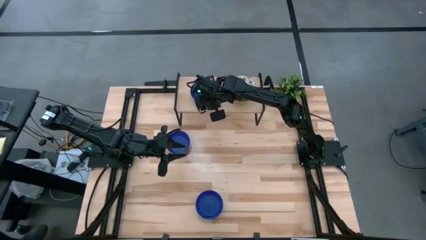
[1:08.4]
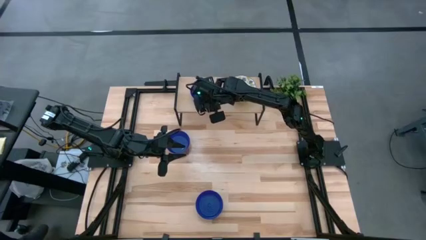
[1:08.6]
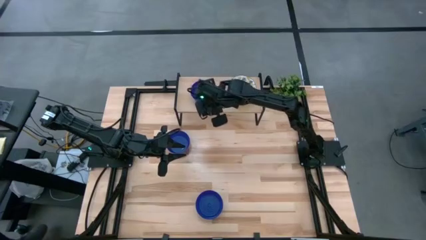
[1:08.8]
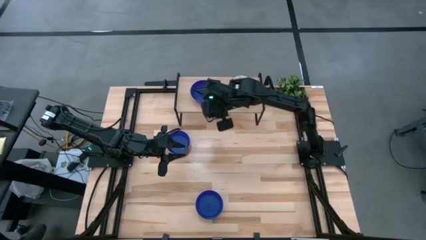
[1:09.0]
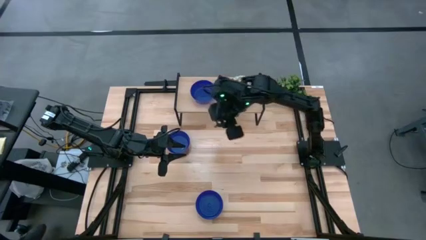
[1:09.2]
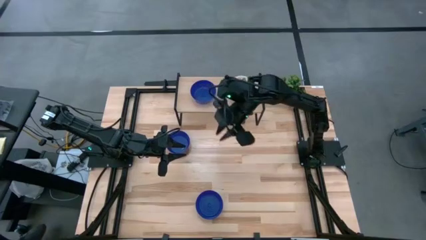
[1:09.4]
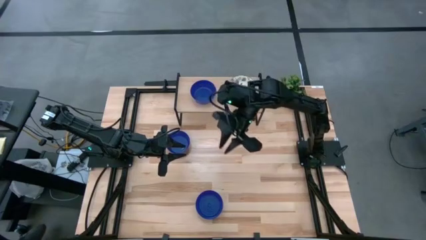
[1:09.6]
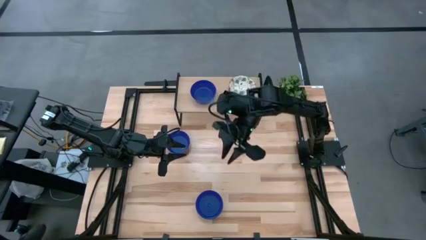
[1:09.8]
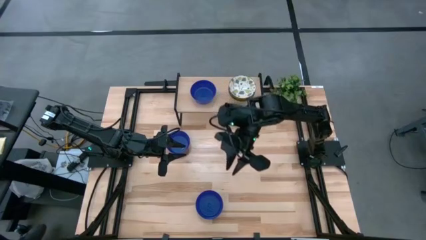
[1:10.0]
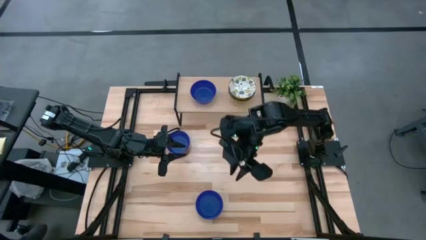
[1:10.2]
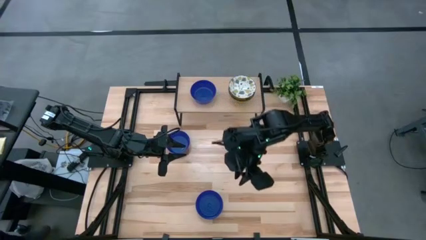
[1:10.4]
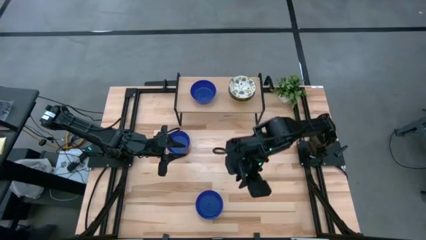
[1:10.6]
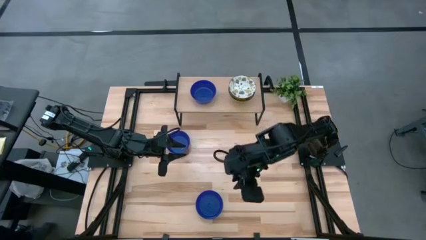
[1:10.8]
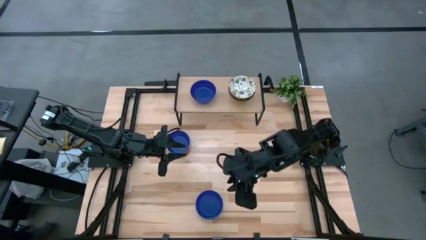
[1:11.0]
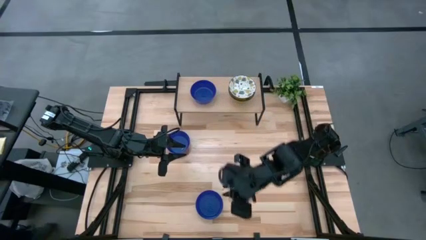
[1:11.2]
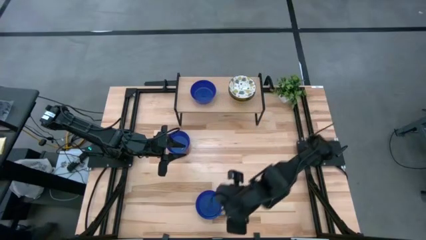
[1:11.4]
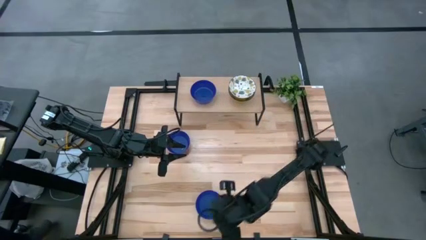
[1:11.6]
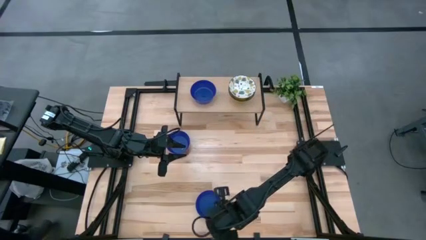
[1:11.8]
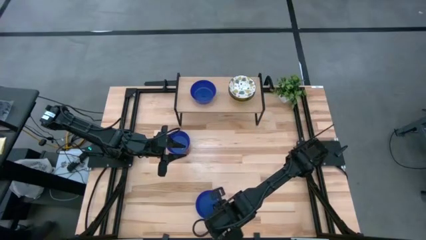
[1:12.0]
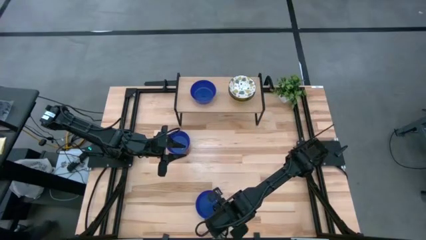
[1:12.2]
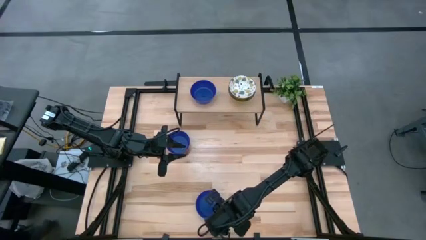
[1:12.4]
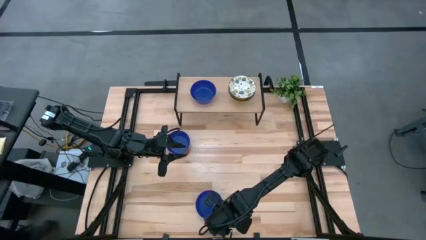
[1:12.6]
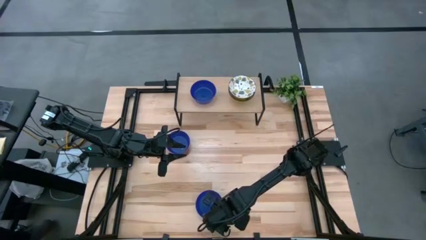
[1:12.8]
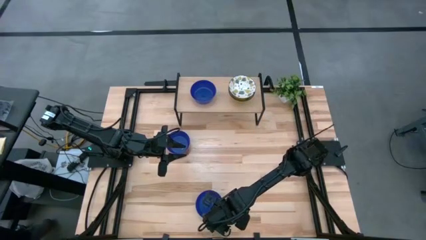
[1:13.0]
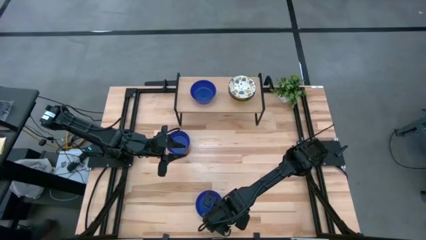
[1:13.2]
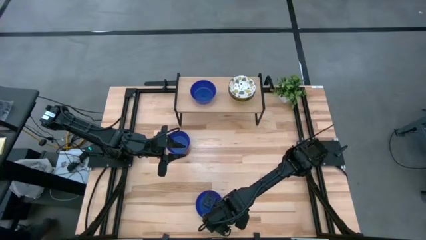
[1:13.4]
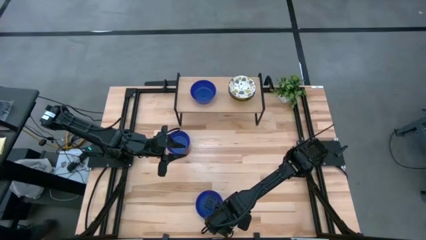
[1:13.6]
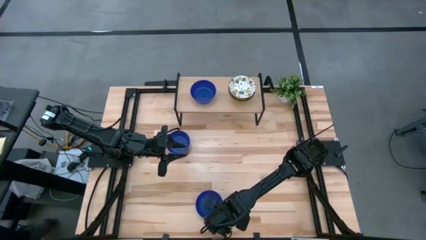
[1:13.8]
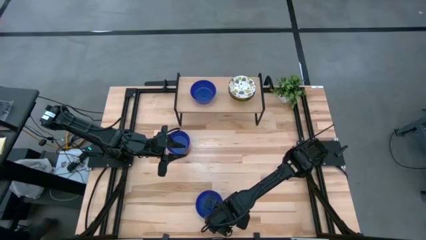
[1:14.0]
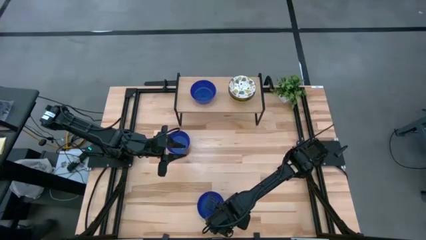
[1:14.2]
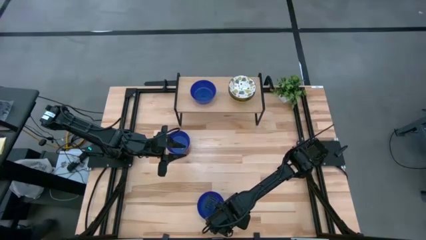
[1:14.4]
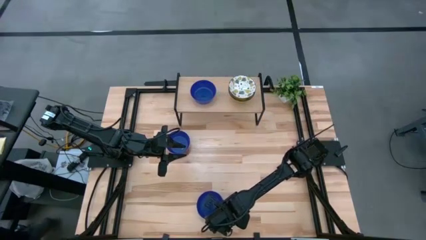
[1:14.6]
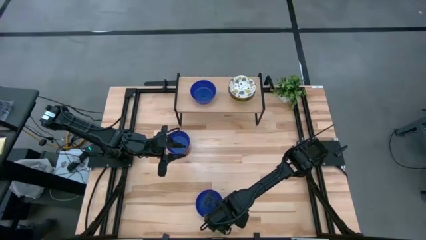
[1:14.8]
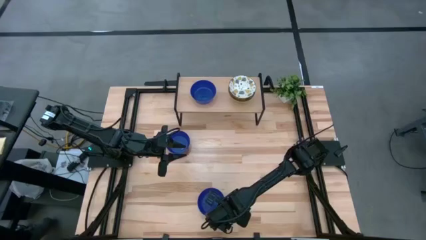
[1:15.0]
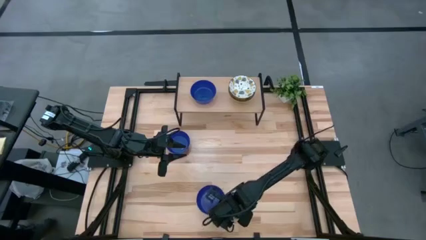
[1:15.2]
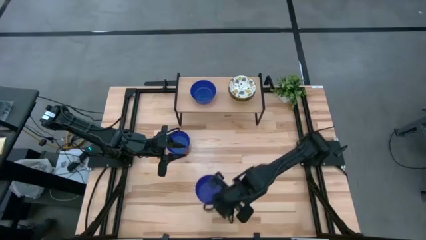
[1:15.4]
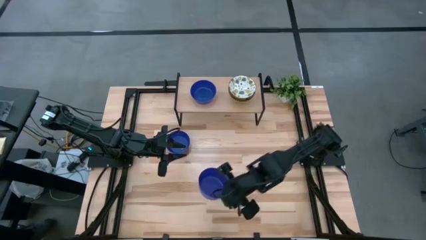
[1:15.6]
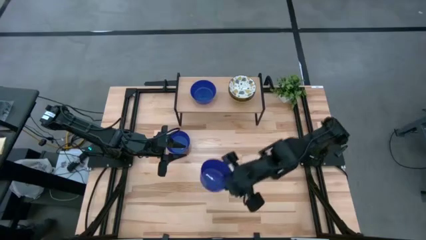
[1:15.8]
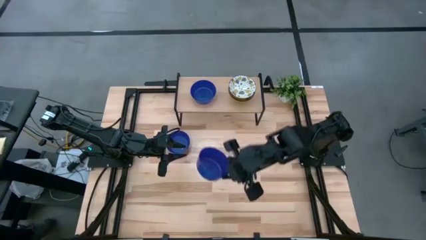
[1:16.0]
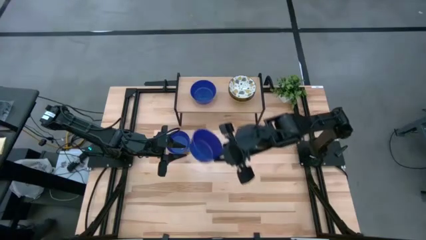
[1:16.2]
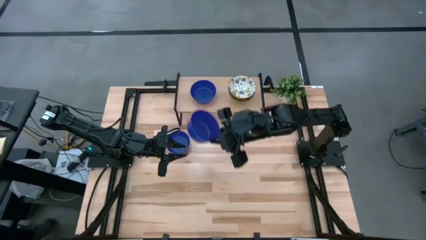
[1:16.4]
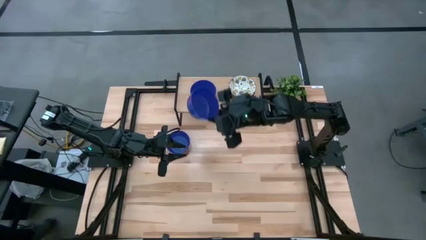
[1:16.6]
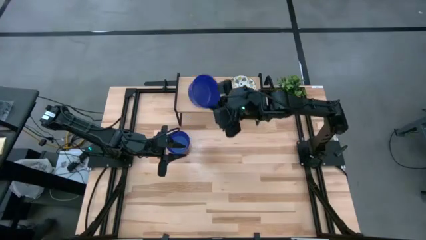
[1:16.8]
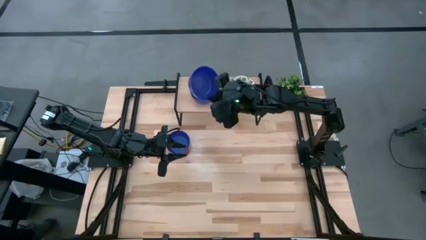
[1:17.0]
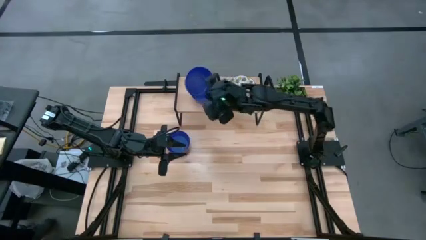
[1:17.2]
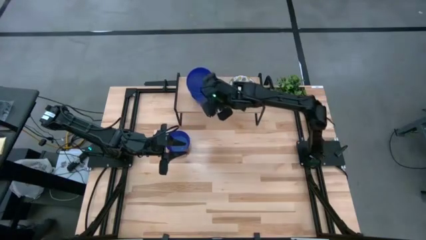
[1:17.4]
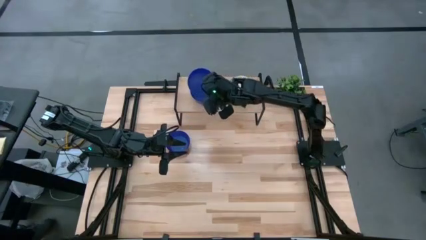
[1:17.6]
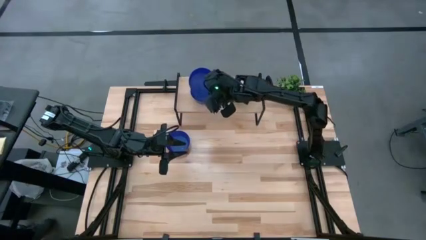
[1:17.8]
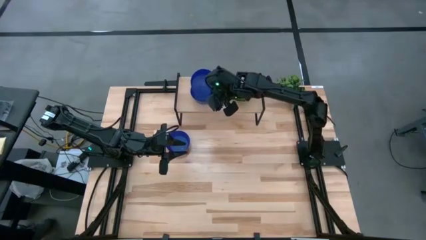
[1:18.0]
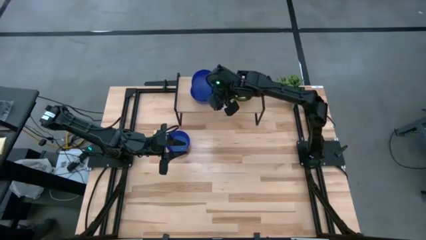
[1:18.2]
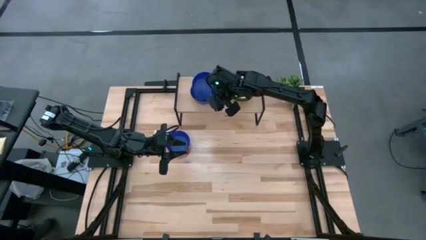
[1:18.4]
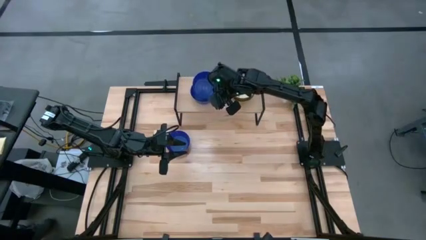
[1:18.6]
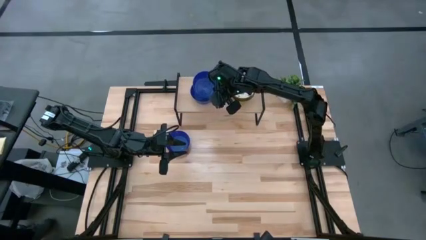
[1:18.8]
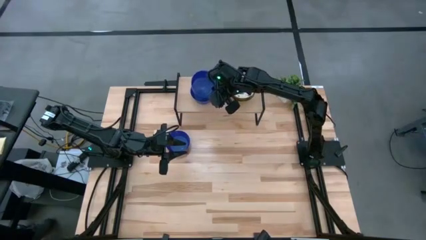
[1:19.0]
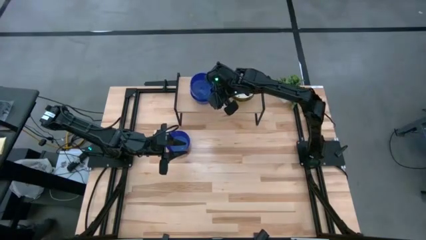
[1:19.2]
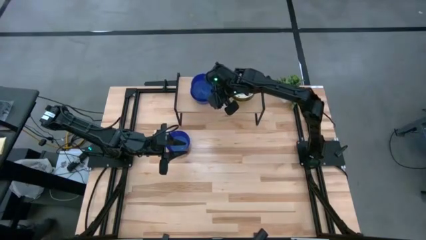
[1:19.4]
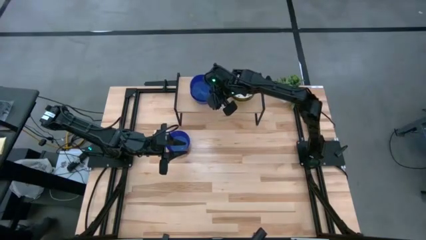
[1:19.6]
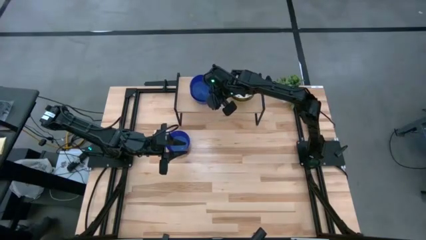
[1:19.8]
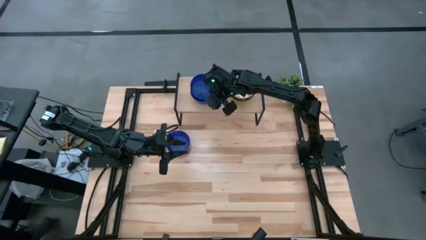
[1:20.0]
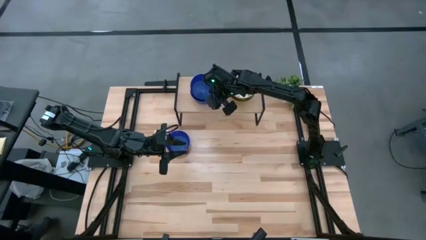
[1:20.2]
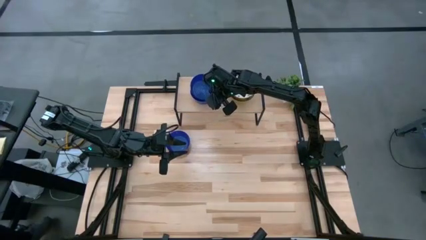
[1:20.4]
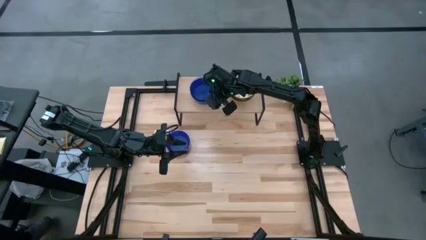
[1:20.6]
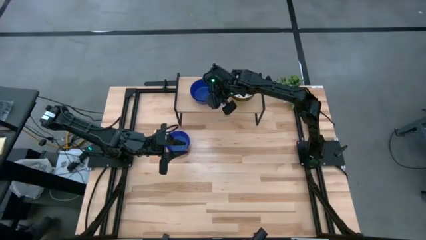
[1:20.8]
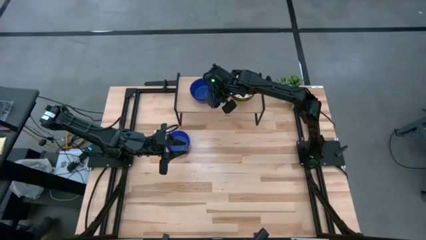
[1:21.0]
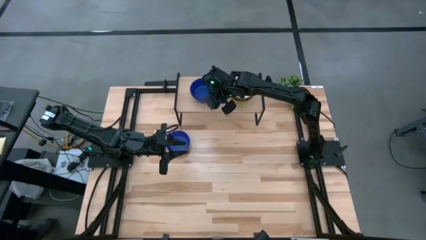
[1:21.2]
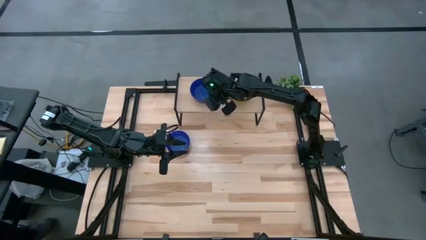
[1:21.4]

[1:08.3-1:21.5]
Task: Pick & Place Mini bowls
Stack the bottom blue bowl on top of the blue bowl on the shelf
